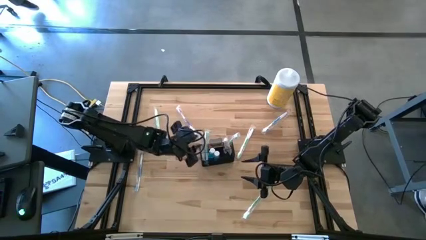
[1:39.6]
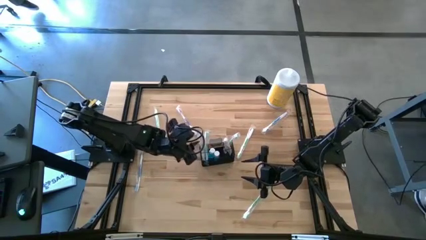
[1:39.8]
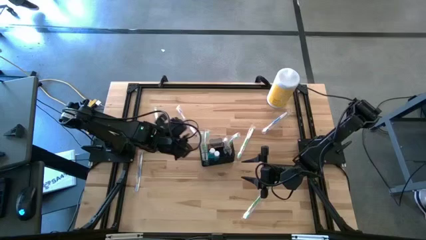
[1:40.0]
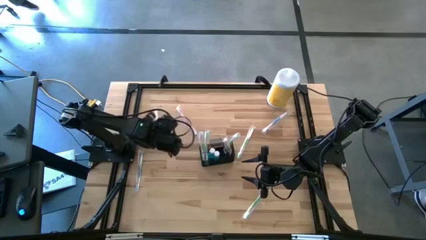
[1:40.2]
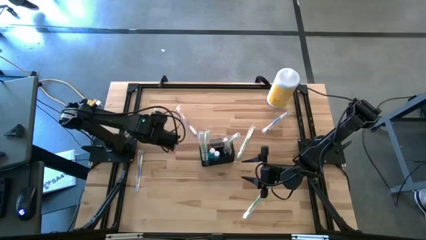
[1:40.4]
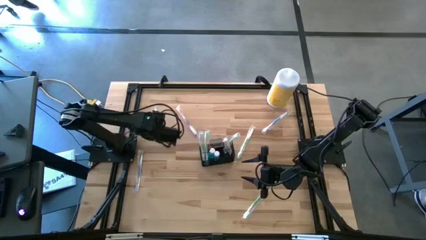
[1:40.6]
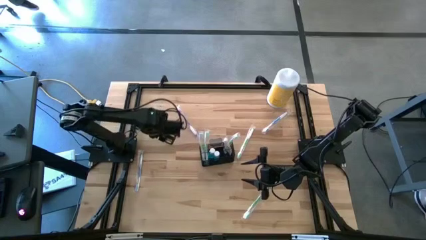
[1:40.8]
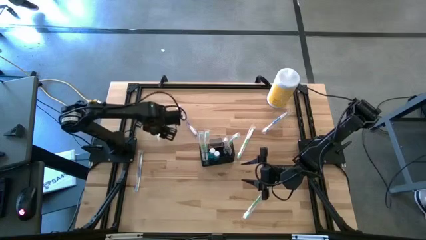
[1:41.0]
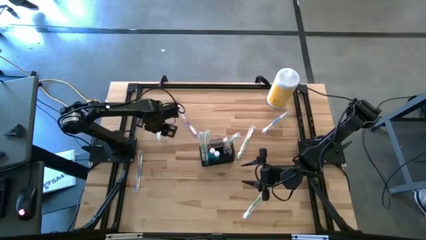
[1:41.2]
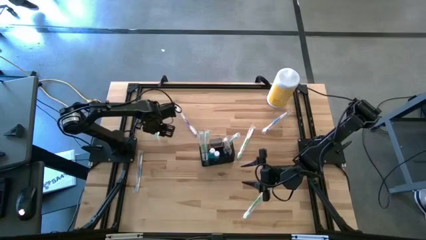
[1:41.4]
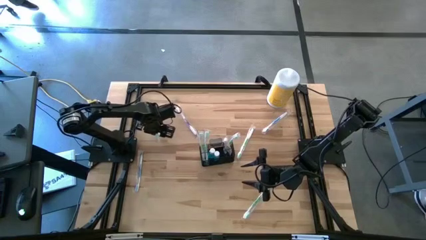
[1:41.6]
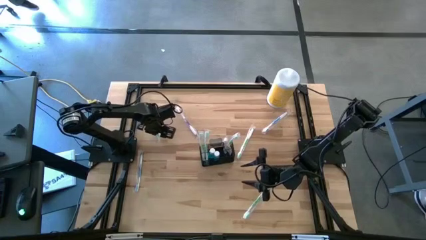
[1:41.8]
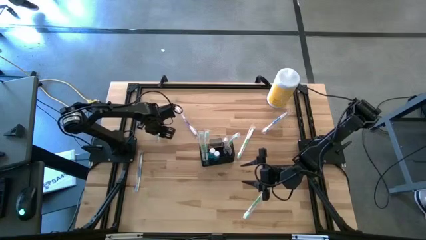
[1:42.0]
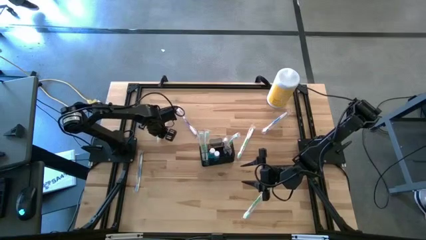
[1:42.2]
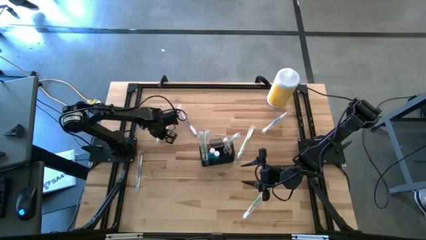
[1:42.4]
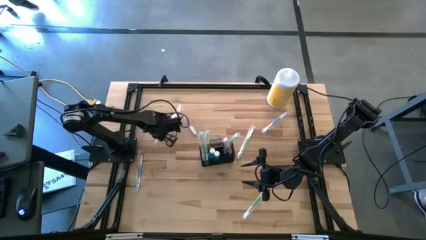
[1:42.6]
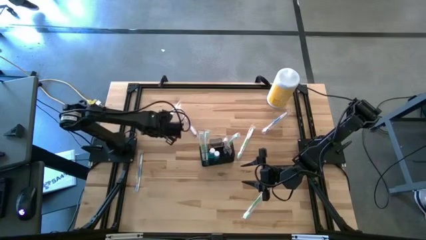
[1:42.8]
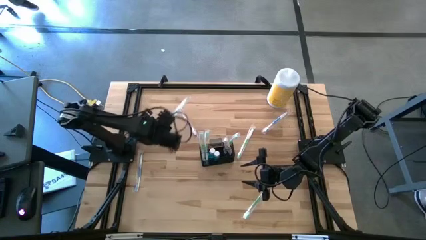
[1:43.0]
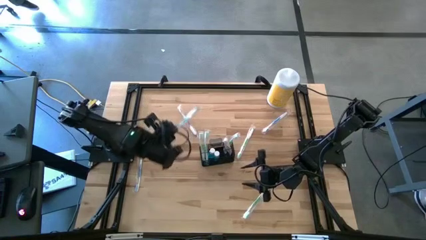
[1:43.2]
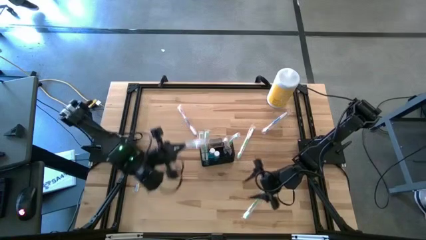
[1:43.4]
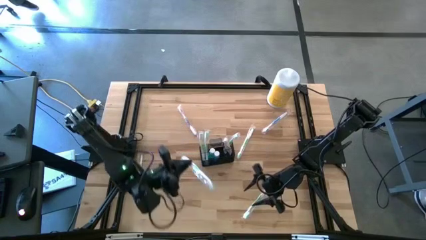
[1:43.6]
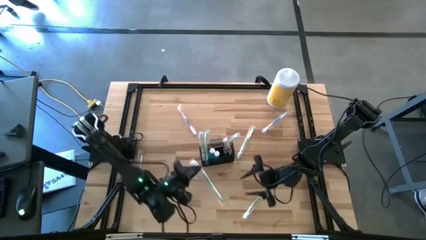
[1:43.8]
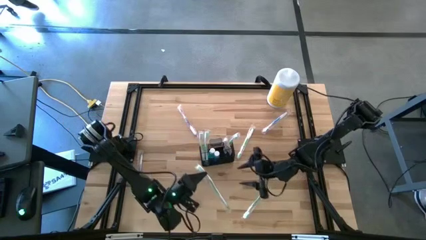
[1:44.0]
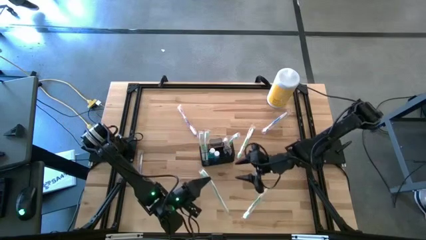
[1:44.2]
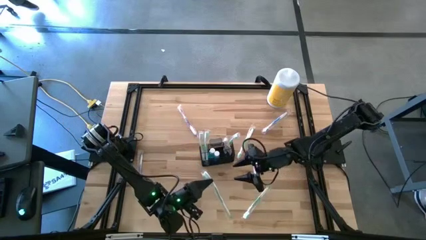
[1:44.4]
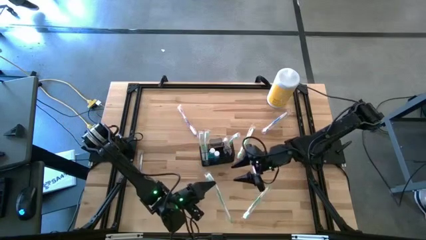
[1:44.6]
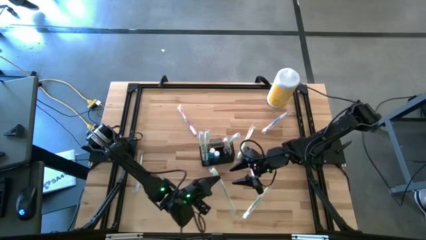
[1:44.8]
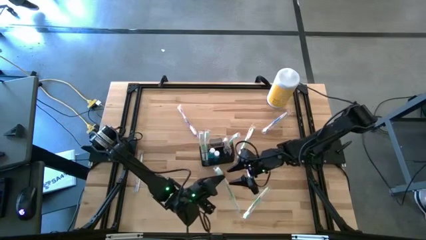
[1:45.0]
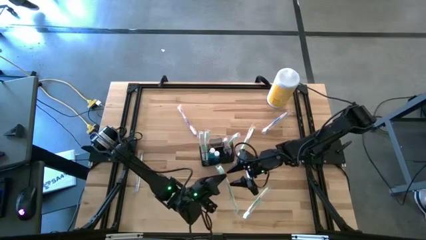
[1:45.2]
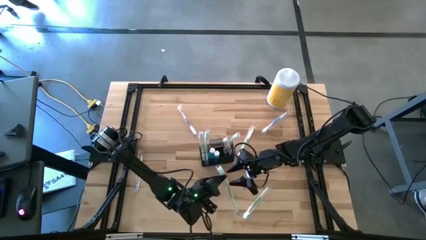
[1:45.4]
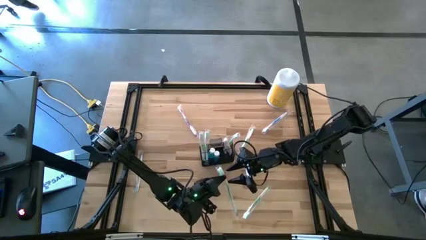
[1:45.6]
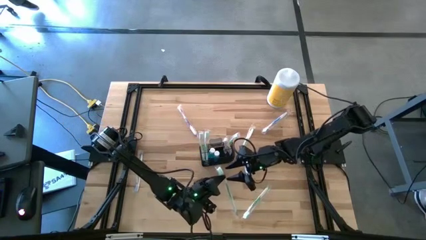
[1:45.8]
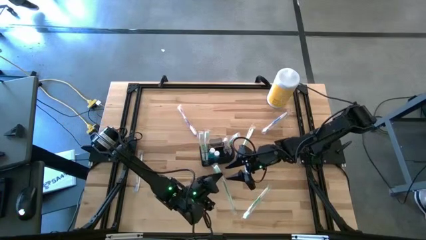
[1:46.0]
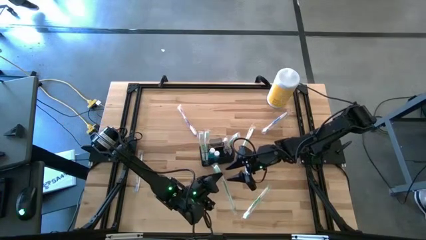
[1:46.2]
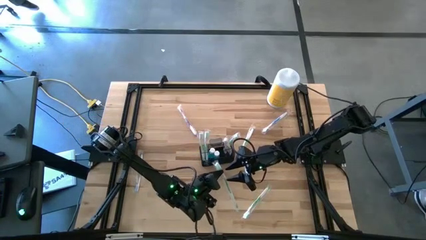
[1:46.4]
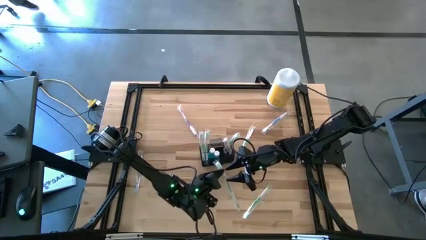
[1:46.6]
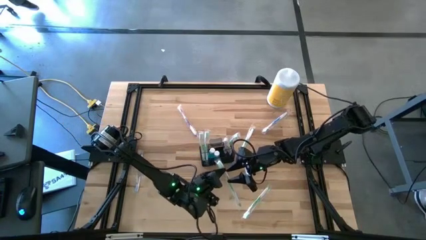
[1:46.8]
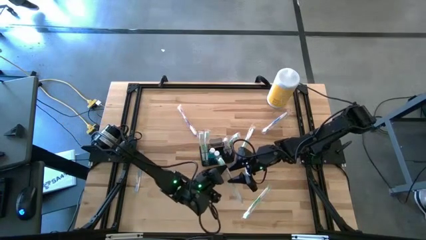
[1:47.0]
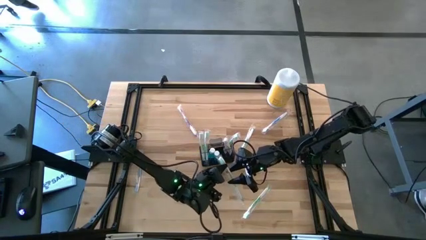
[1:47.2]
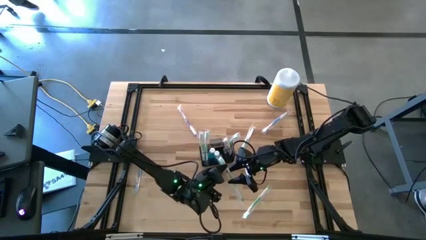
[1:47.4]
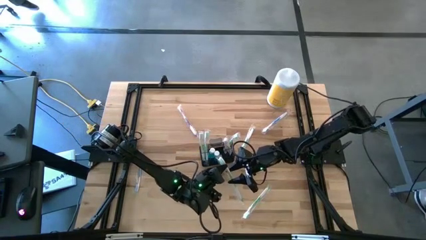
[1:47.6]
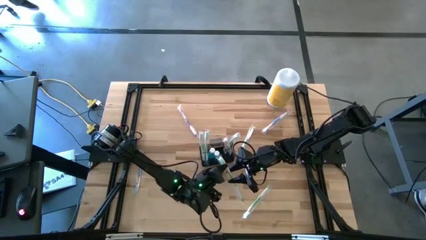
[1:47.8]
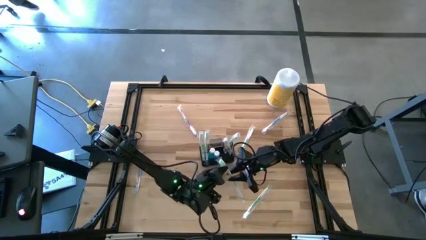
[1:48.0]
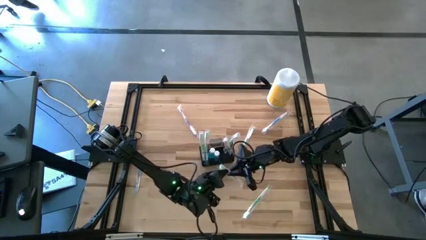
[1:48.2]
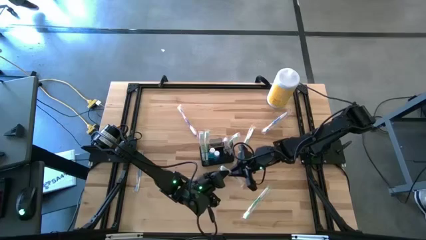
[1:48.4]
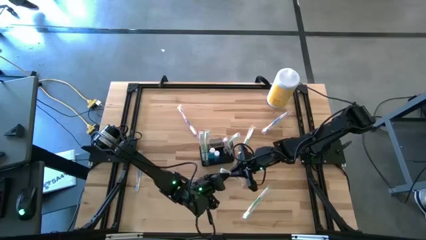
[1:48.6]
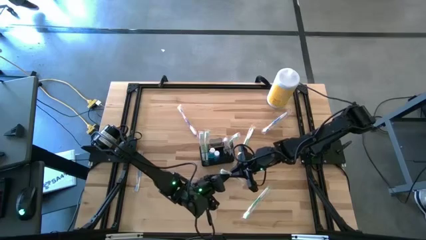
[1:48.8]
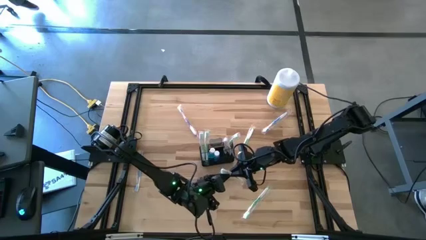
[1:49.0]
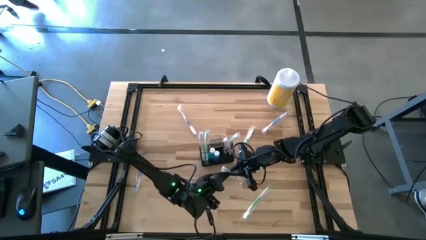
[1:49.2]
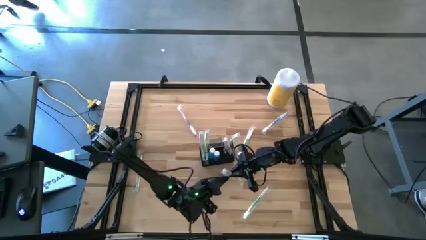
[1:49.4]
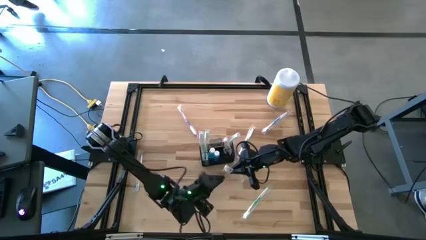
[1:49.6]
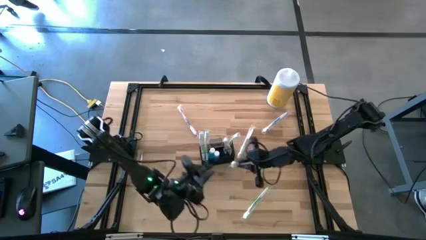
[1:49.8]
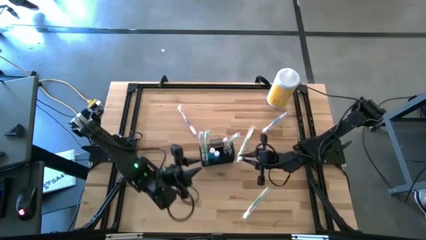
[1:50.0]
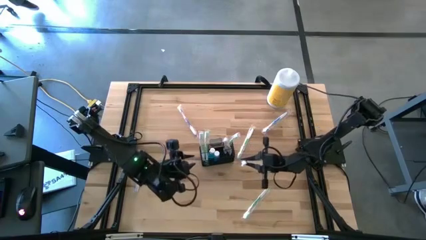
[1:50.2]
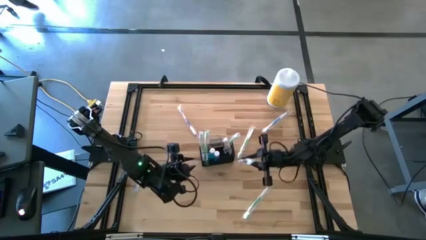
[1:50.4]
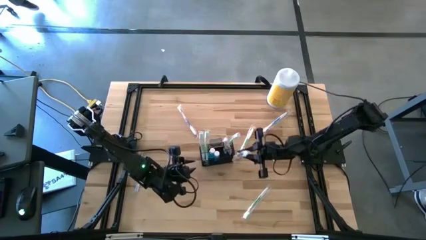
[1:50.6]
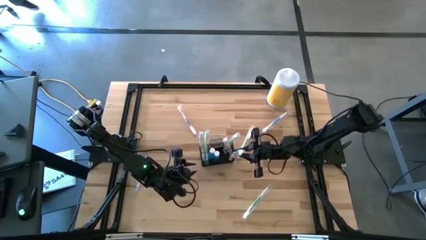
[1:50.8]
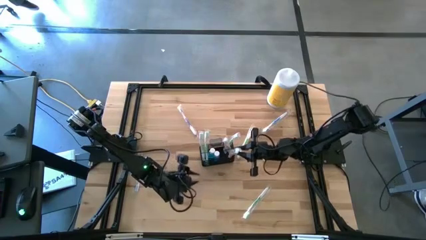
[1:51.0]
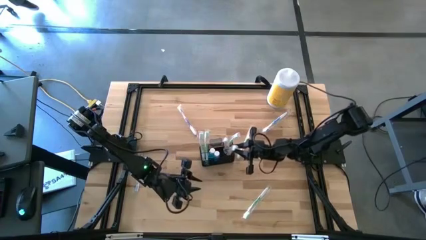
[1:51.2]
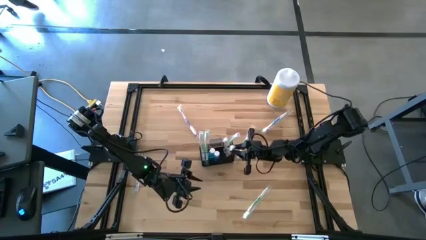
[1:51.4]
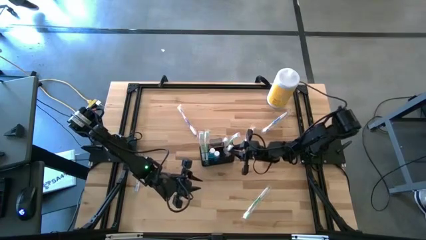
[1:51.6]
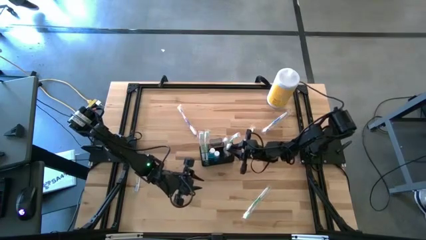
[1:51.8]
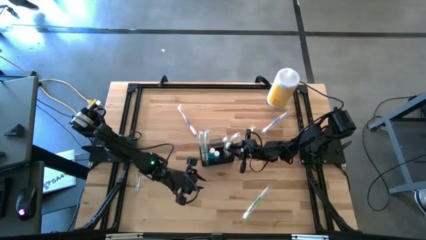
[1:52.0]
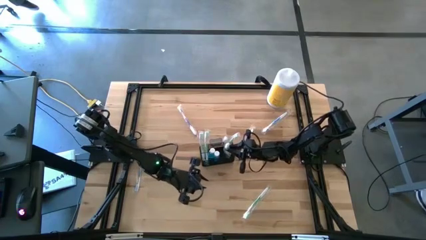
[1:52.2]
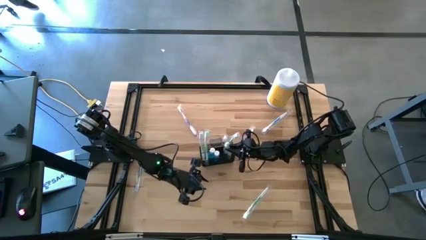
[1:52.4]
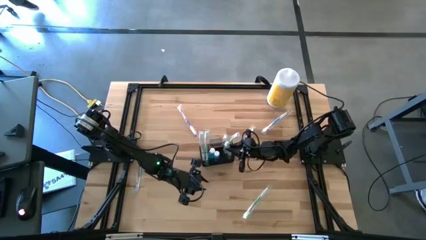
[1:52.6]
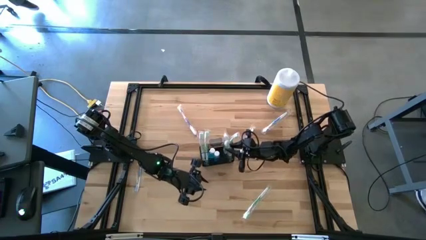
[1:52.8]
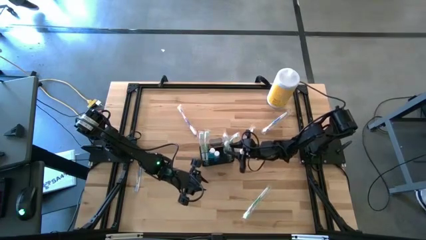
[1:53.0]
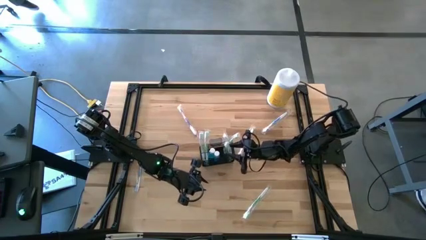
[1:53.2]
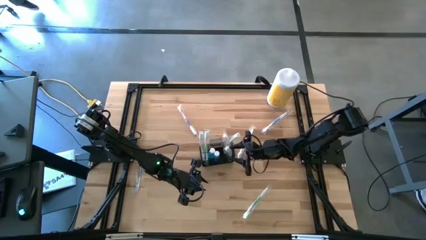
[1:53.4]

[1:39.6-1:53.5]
Task: Pick & Place toothbrushing station
Put the green toothbrush into the black mesh organizer

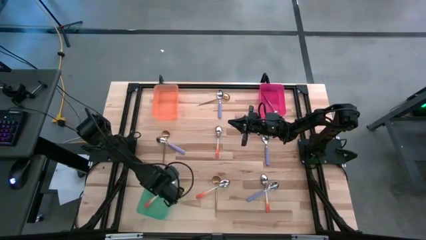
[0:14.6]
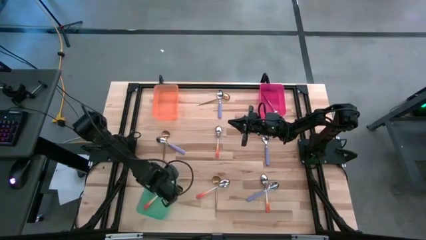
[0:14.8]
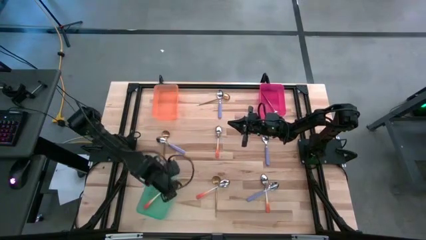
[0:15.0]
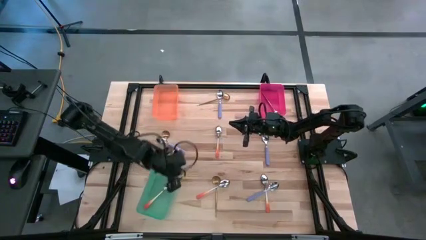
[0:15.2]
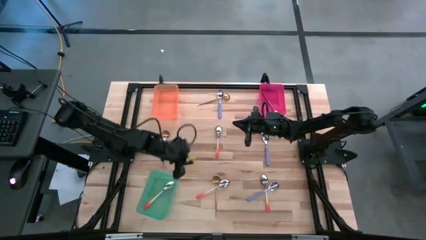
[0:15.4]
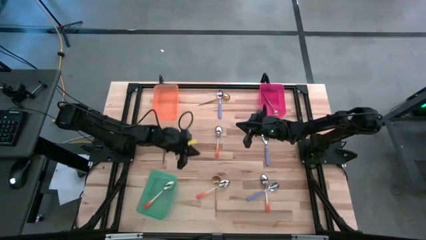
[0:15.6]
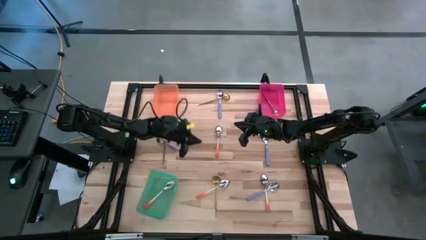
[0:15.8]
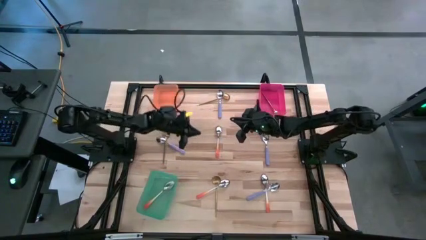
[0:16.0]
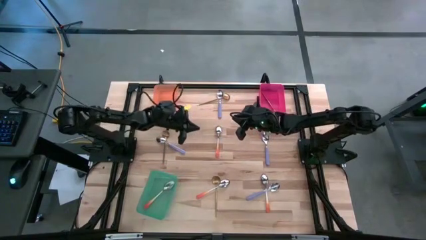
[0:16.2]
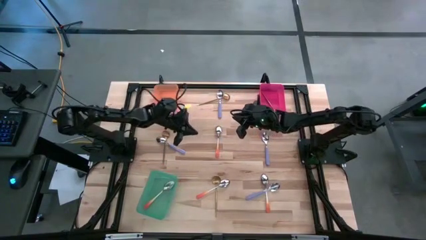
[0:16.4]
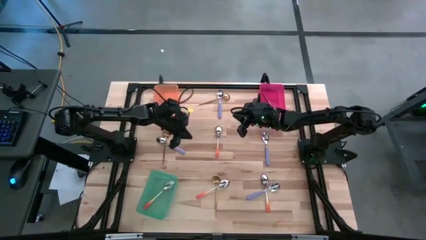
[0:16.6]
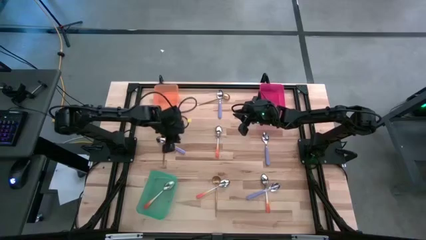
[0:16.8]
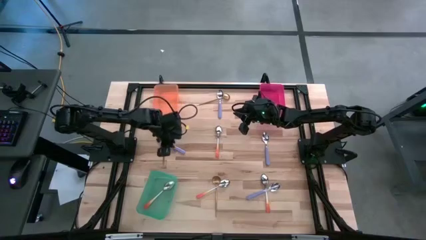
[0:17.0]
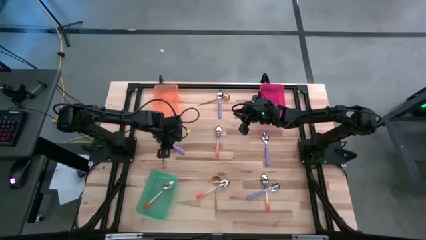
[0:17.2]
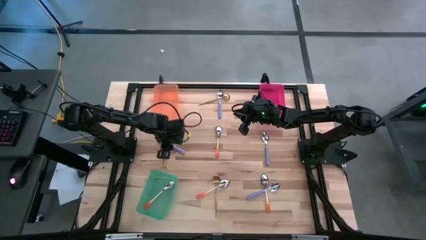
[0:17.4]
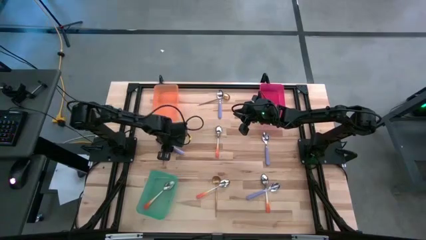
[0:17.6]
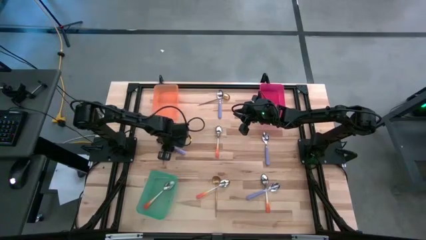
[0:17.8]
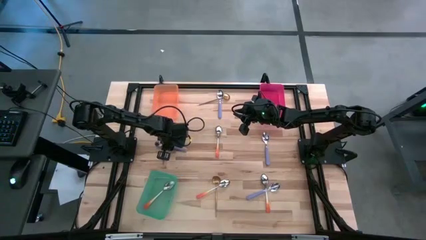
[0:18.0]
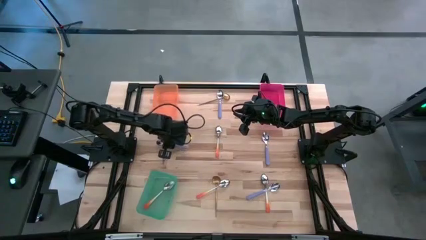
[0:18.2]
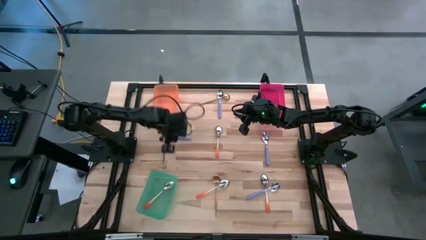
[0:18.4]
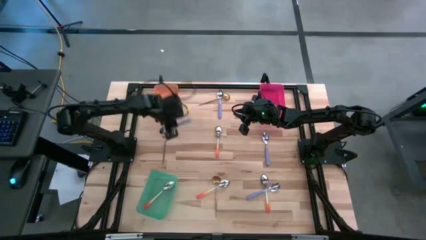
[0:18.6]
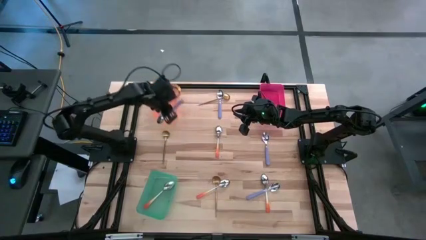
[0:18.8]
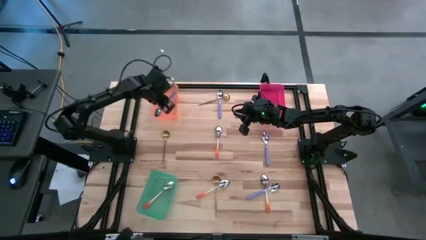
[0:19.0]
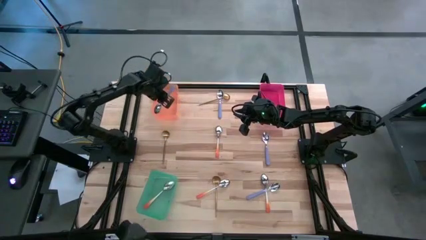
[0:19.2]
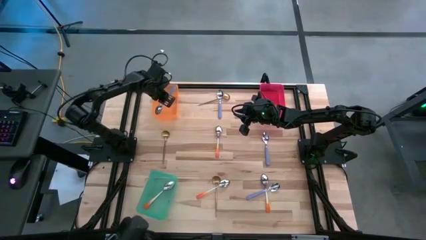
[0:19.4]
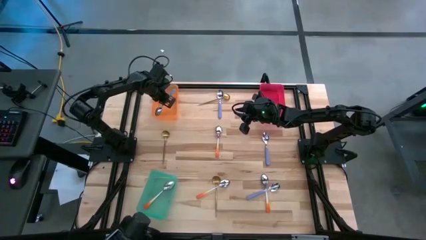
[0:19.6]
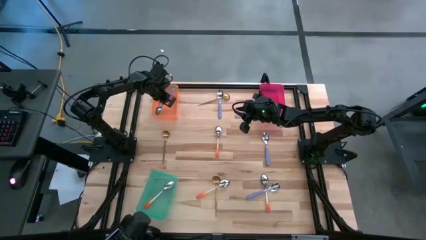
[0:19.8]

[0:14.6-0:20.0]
Task: Sort silverware by color (type)
Put the purple spoon into the orange bin
